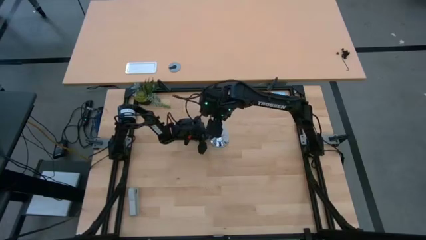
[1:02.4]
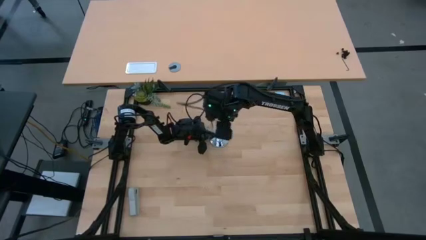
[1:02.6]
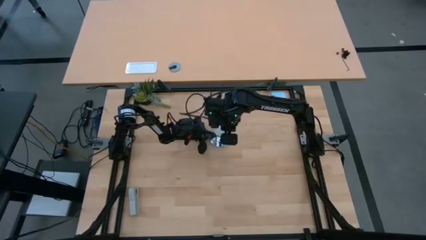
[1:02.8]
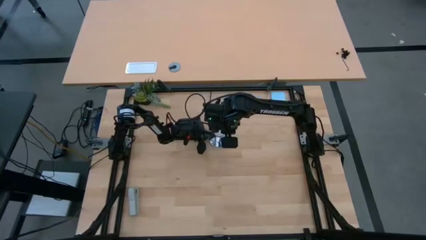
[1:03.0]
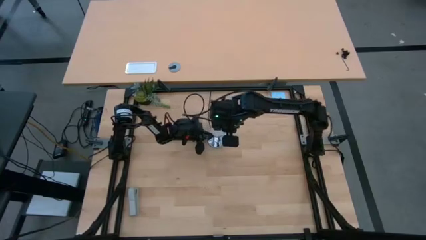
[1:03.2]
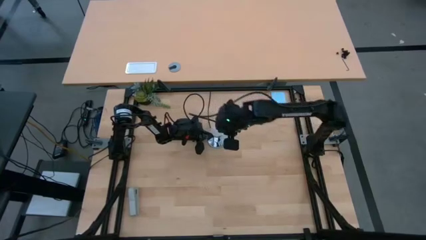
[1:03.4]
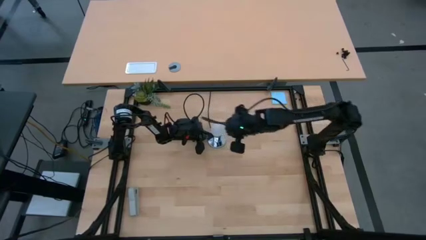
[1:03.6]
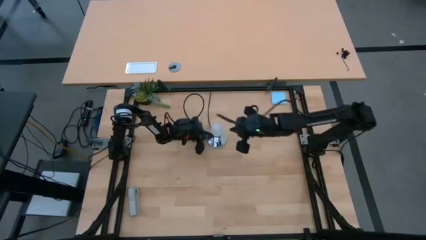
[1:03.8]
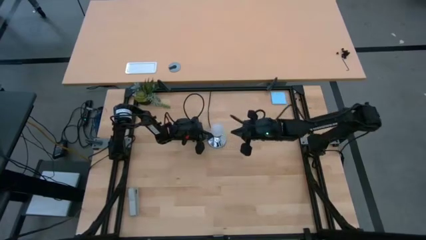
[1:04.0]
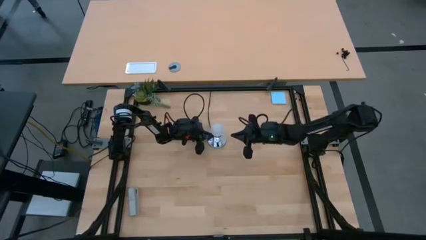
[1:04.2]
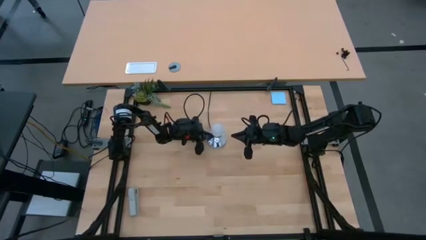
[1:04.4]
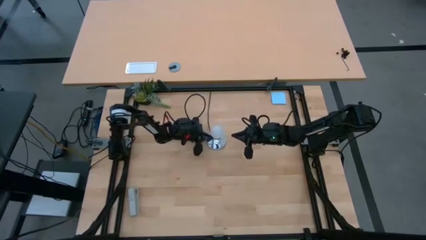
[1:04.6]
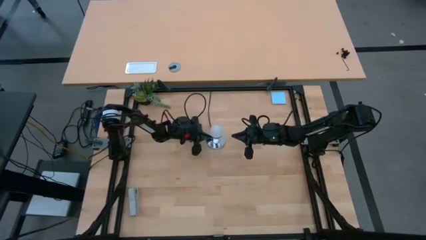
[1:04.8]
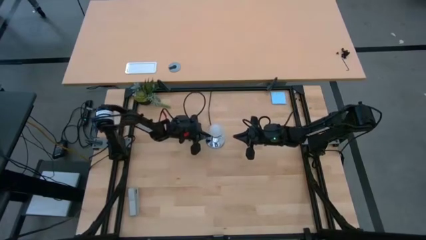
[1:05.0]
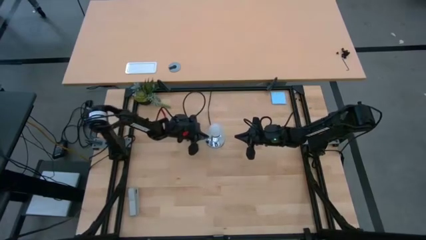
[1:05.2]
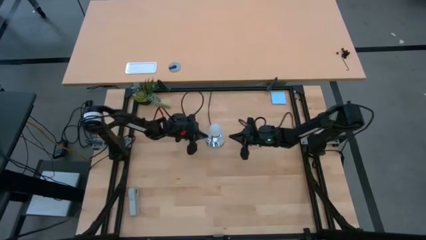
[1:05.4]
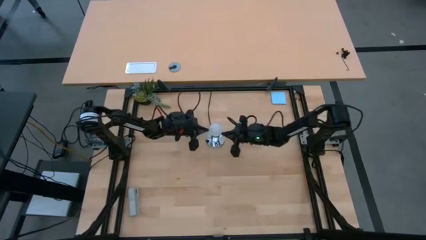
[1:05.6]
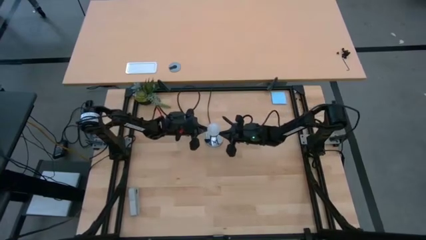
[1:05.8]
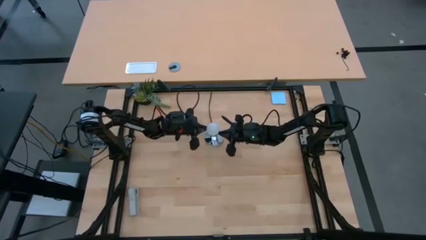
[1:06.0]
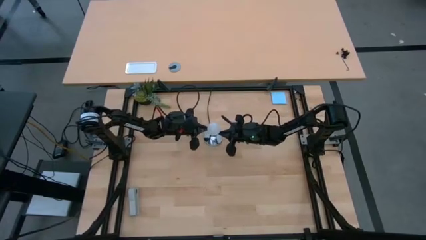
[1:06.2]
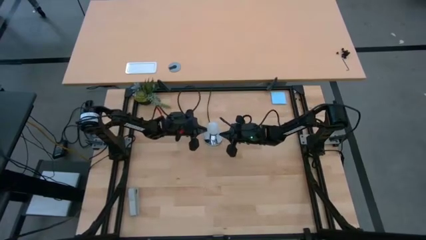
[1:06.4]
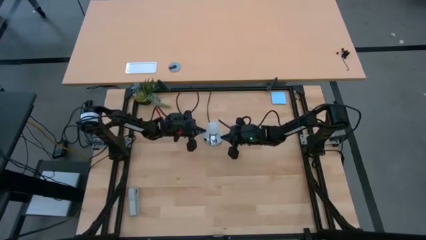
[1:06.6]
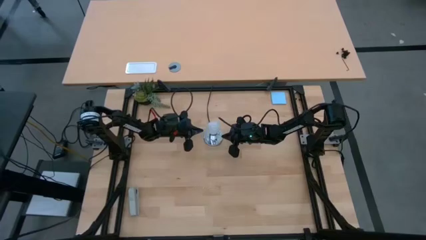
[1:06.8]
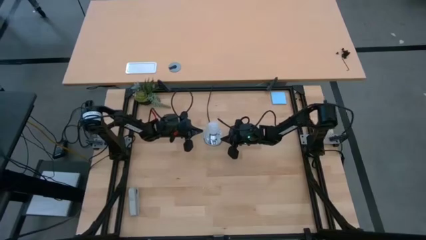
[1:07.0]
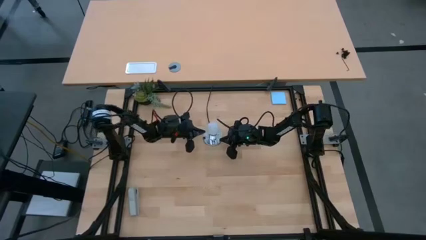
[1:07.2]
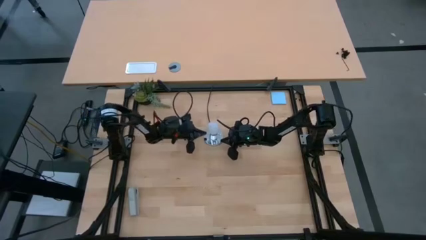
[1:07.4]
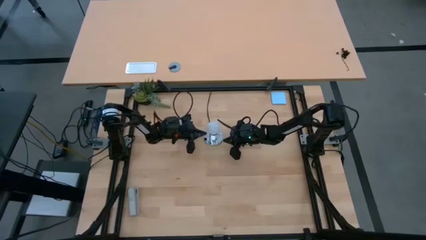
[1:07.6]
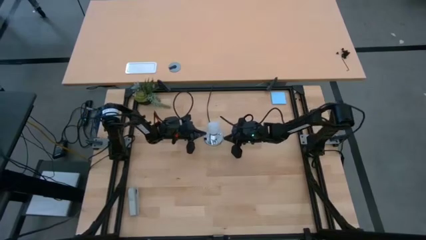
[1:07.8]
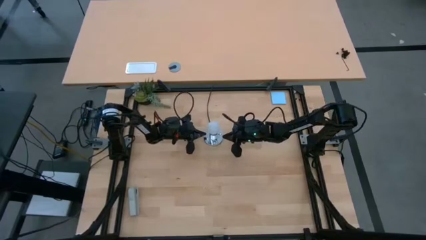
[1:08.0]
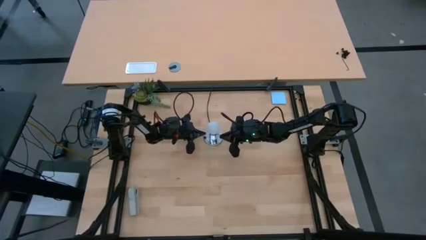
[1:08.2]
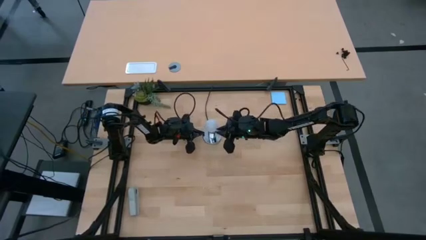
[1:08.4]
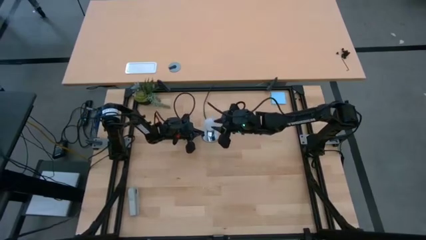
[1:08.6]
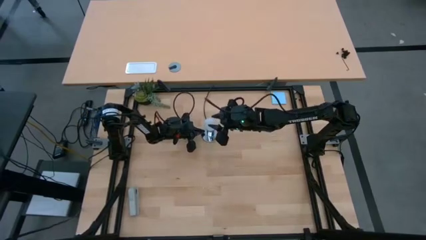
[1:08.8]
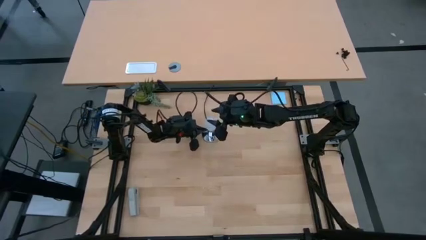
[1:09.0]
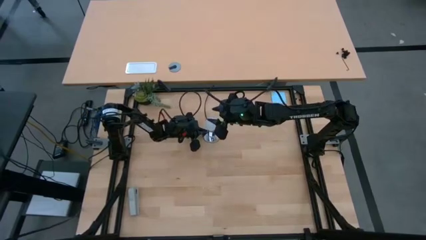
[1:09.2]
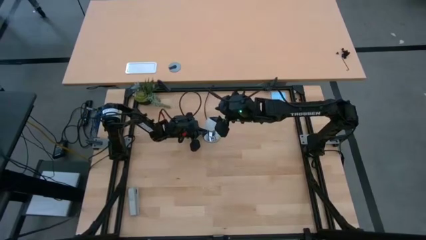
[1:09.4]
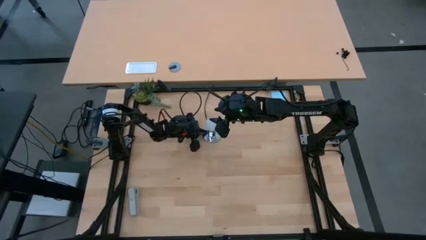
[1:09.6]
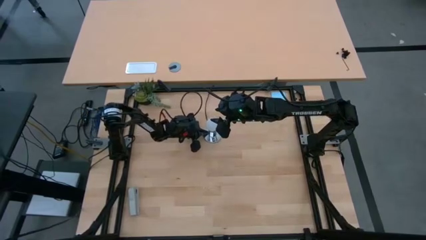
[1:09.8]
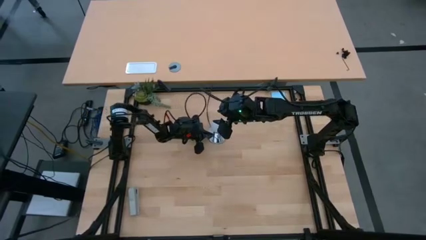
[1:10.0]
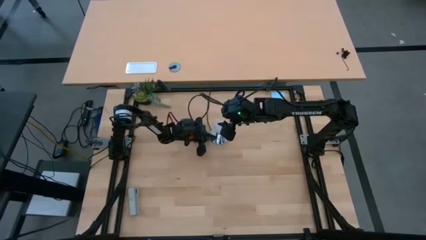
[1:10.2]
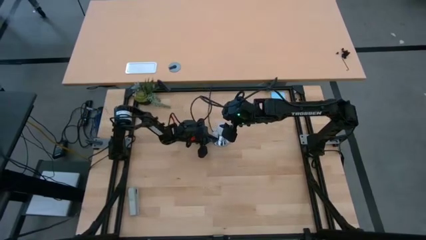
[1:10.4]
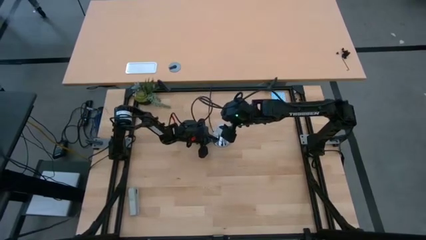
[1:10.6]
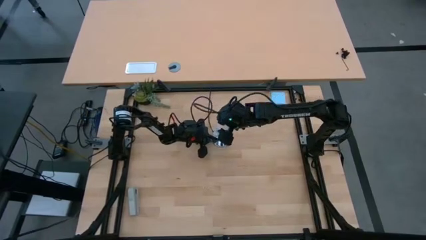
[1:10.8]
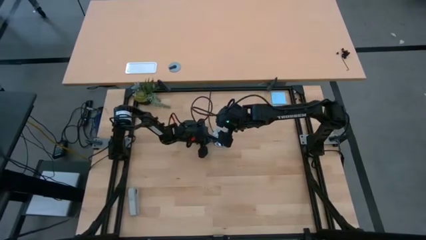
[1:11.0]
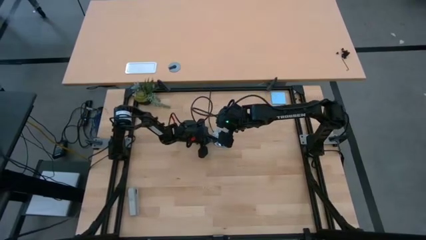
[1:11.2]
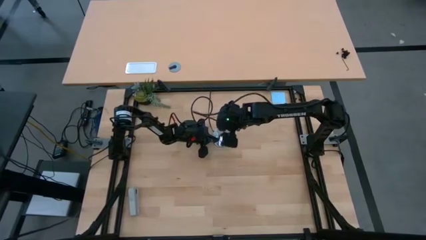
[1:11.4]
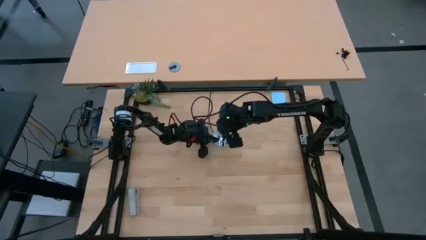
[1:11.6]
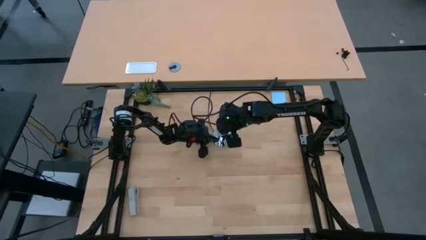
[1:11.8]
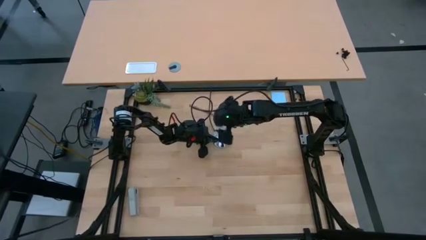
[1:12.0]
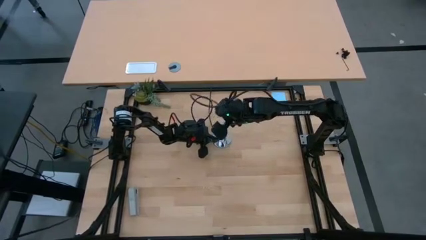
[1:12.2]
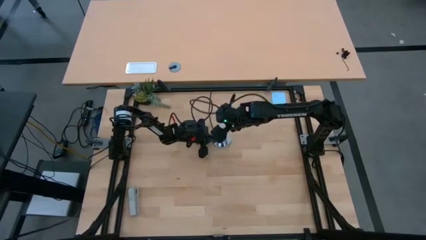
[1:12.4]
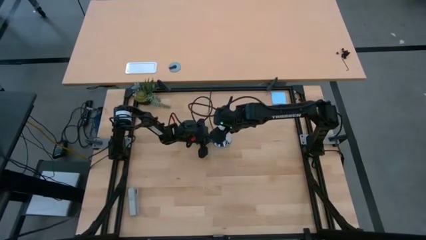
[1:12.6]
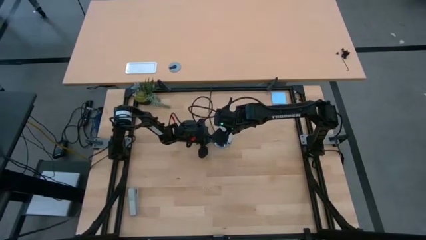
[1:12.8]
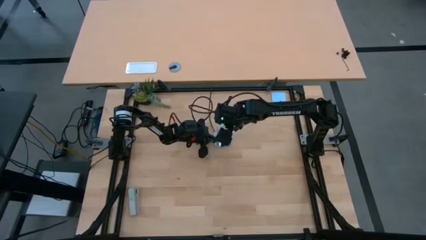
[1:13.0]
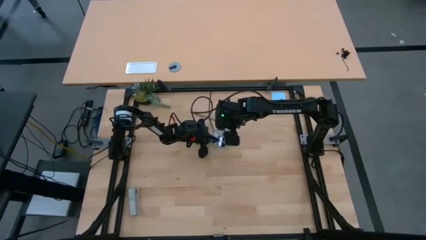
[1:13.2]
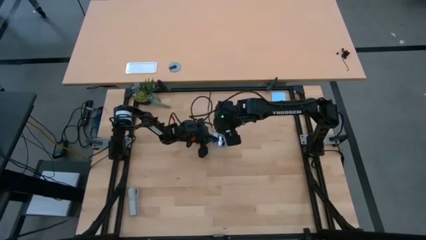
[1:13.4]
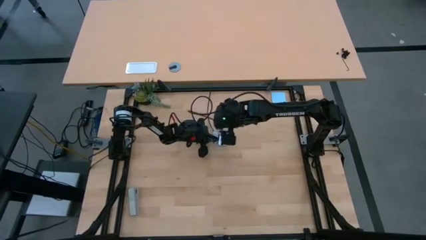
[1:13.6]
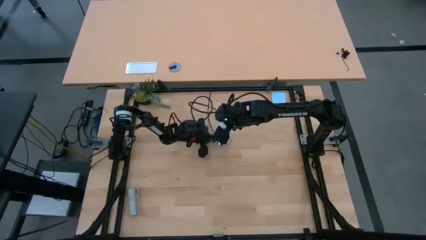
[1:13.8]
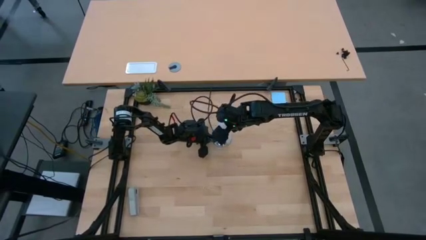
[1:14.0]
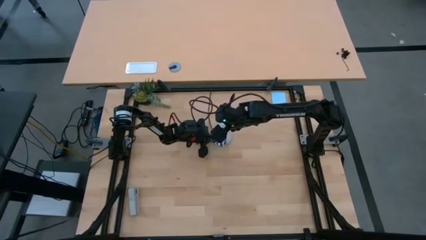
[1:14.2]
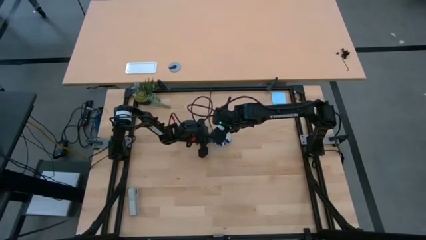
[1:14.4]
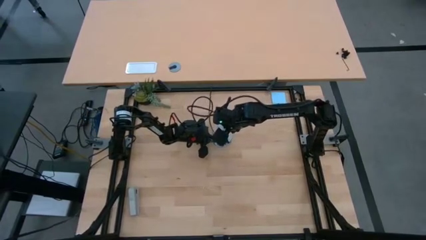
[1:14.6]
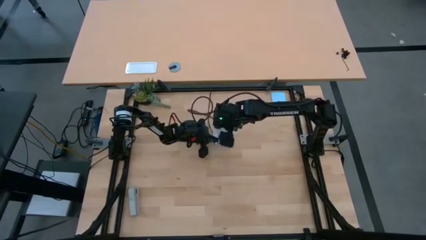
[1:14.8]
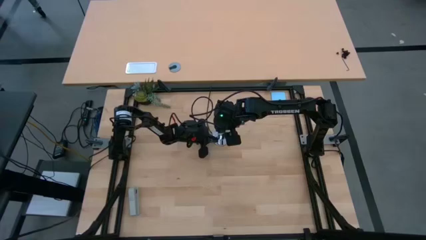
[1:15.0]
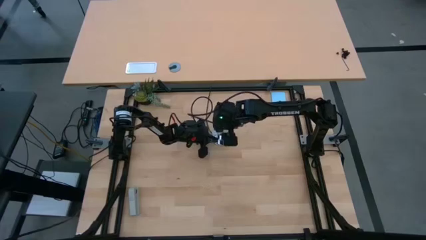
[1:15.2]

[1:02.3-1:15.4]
Task: Screw lightbulb
Remove the white lightbulb from the silver lamp
